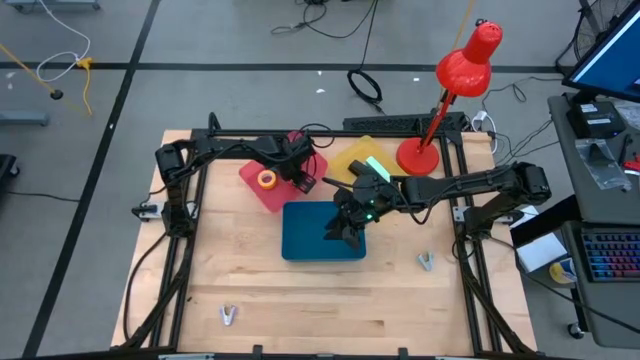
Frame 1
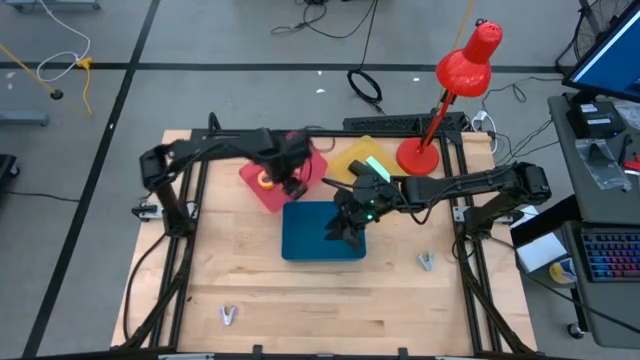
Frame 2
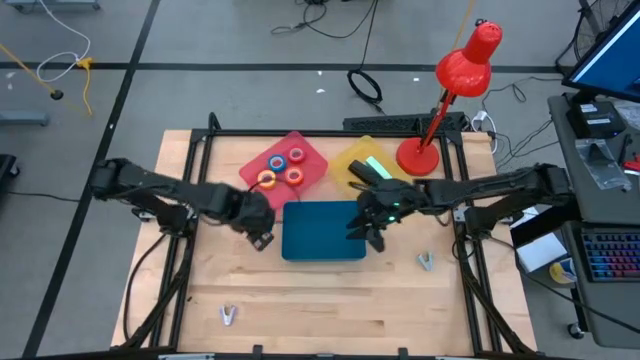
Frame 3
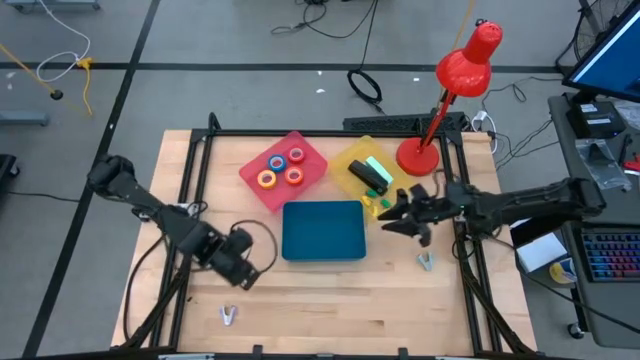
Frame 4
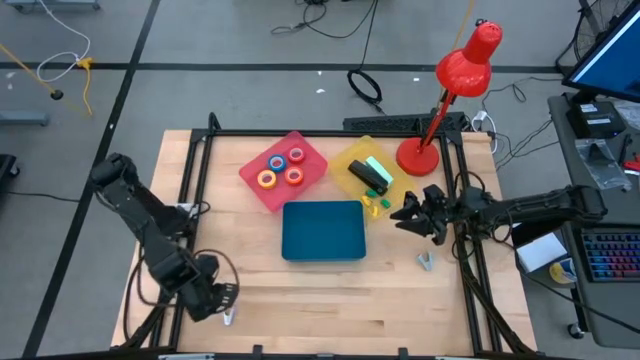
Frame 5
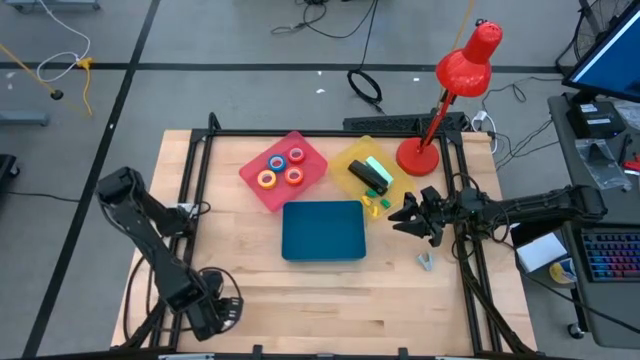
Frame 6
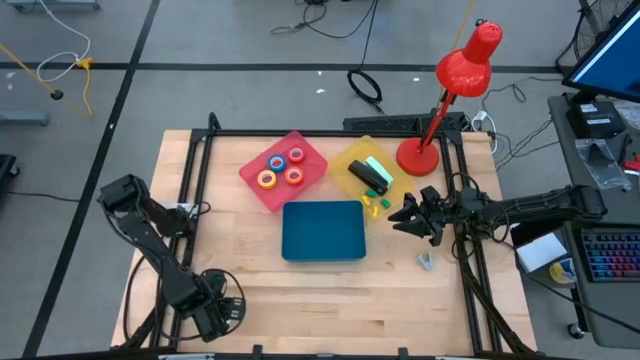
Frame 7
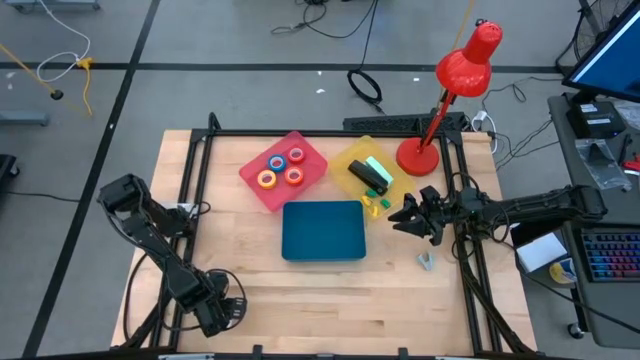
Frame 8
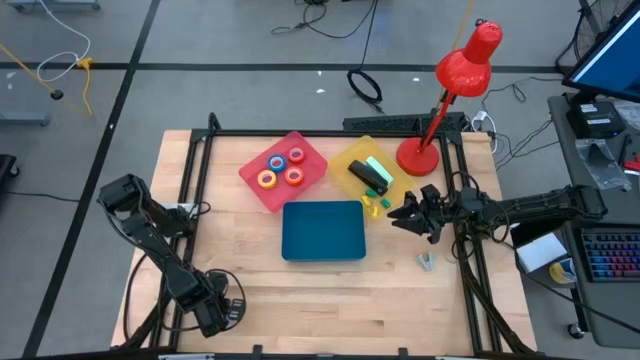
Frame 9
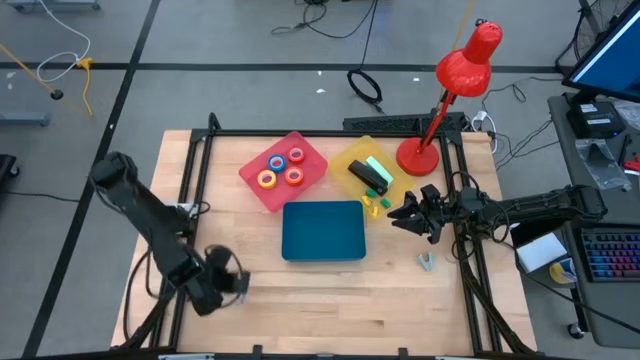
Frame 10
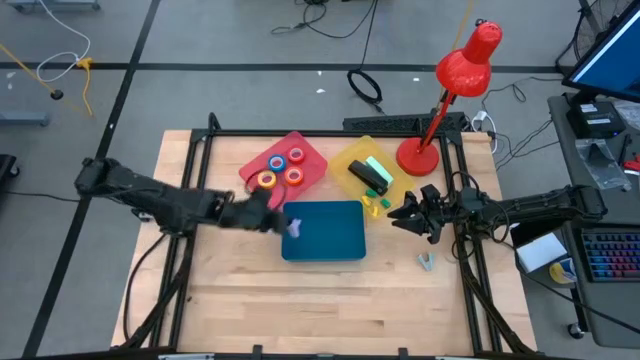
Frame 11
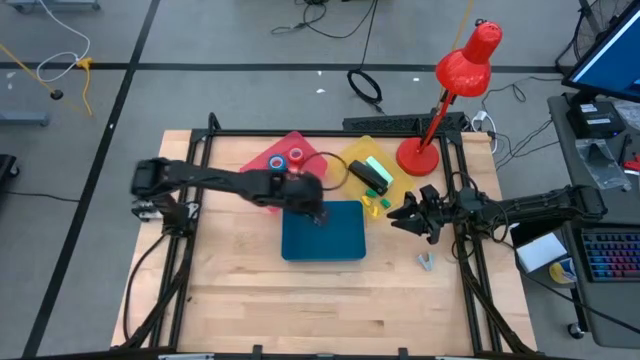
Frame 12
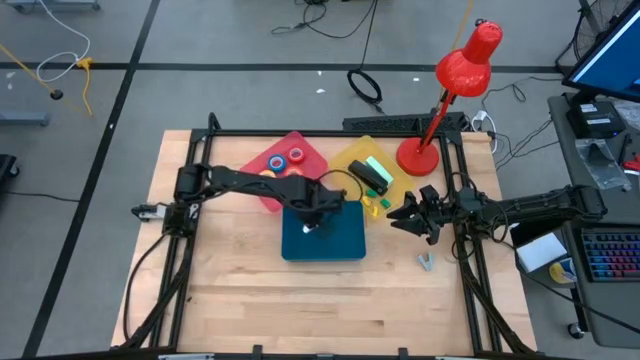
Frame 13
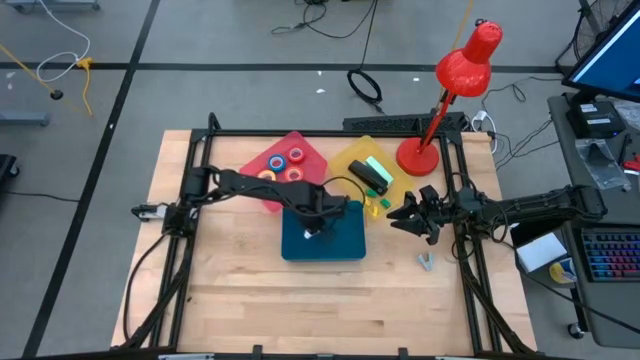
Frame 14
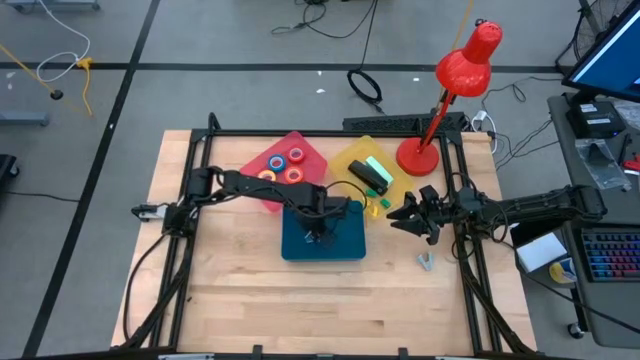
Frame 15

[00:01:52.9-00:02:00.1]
Task: Pick and place Stapler, Stapler remover, tape
Put the violet stapler remover into the blue bin

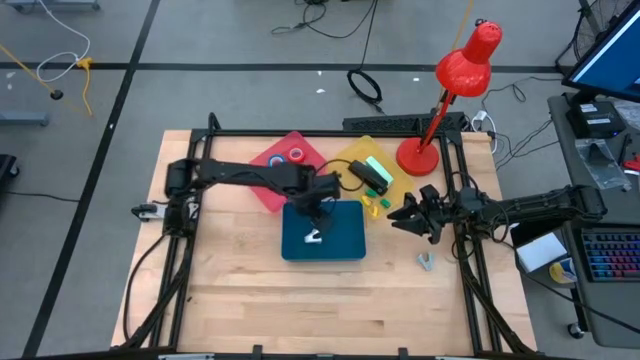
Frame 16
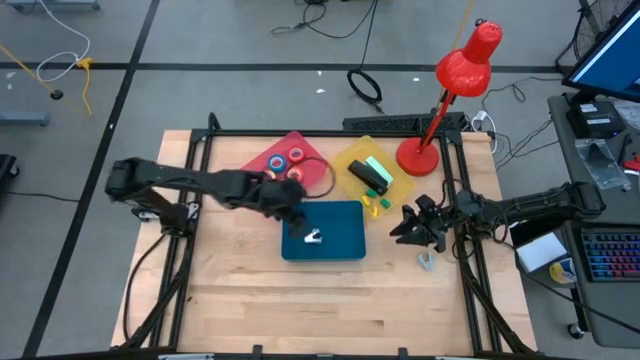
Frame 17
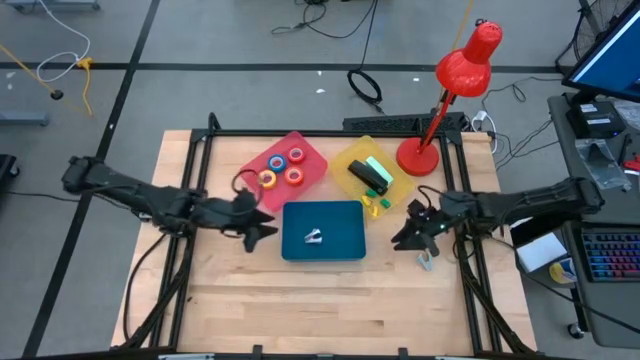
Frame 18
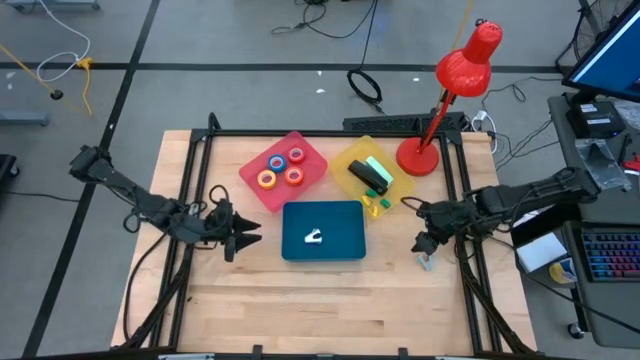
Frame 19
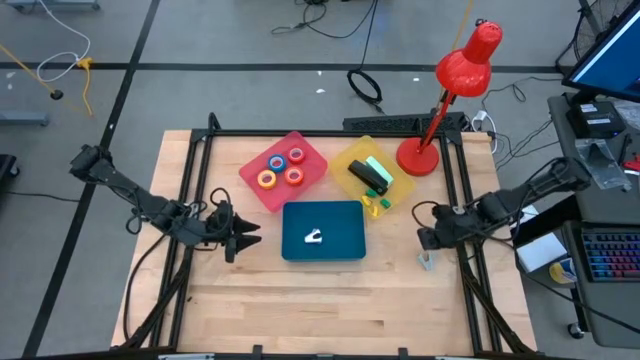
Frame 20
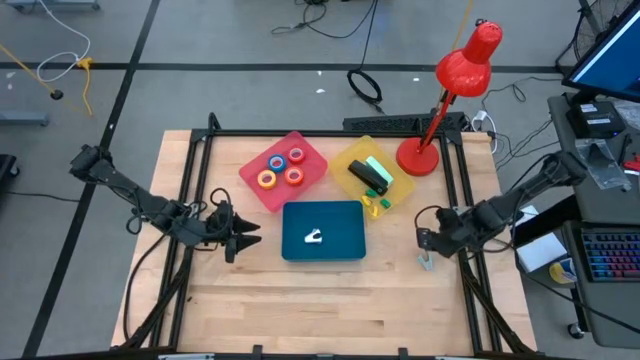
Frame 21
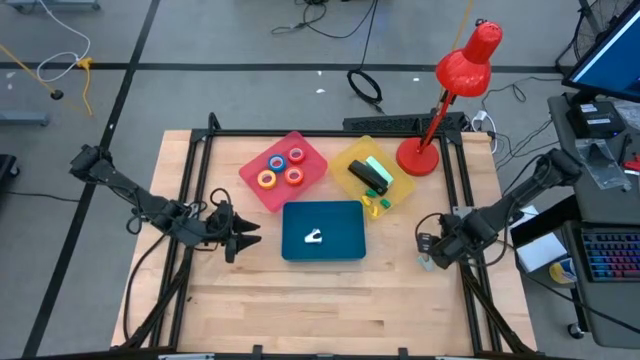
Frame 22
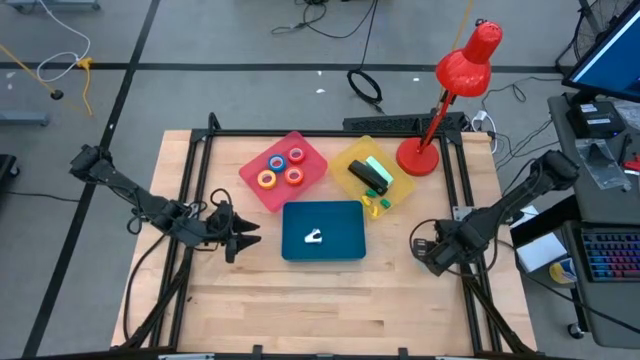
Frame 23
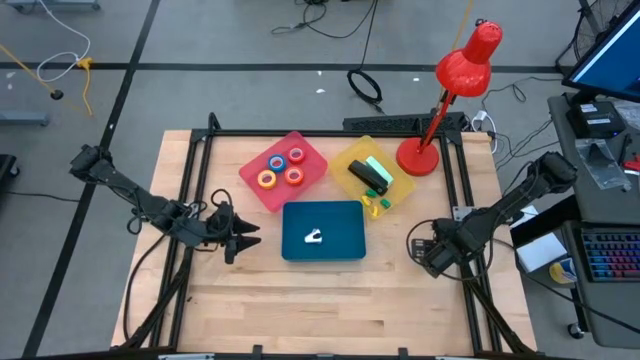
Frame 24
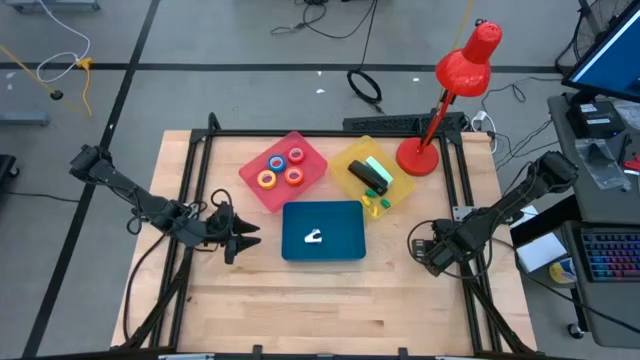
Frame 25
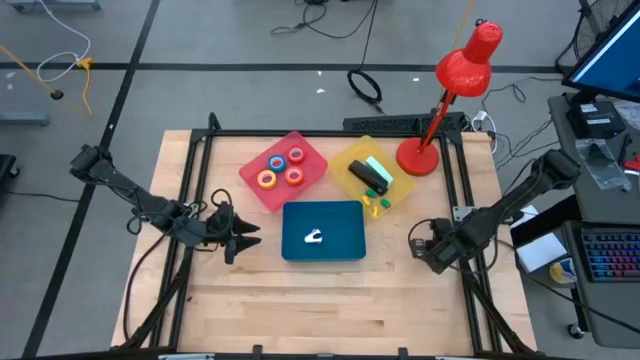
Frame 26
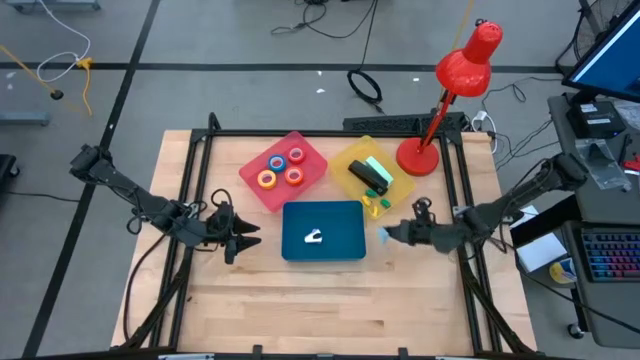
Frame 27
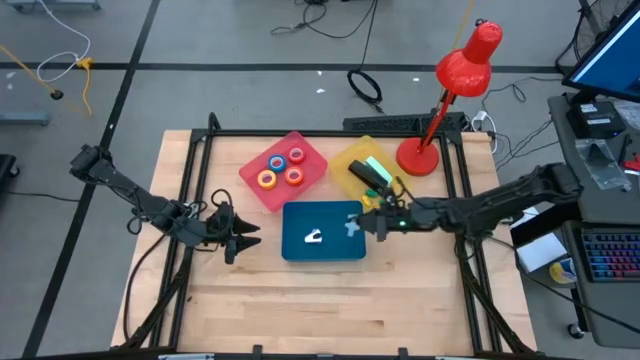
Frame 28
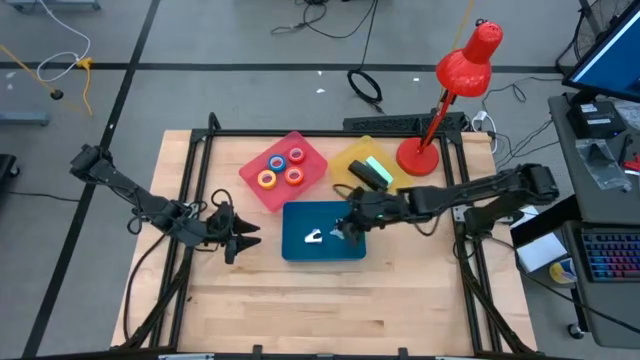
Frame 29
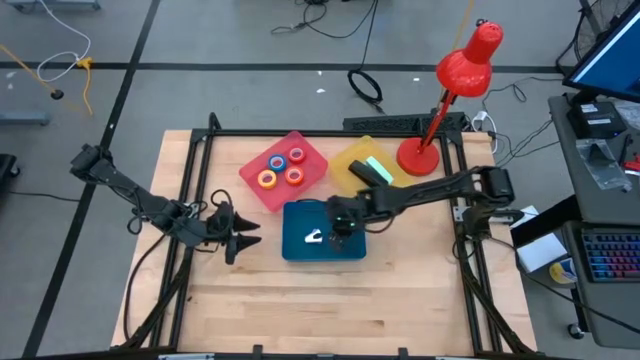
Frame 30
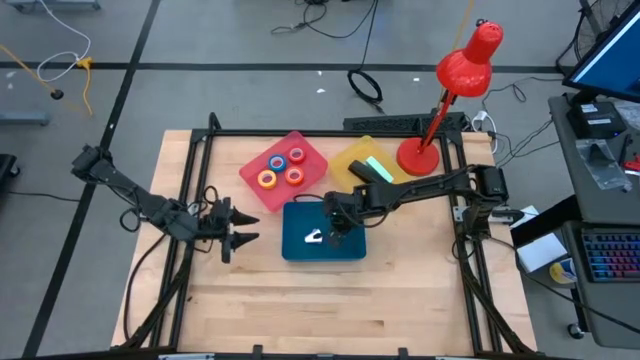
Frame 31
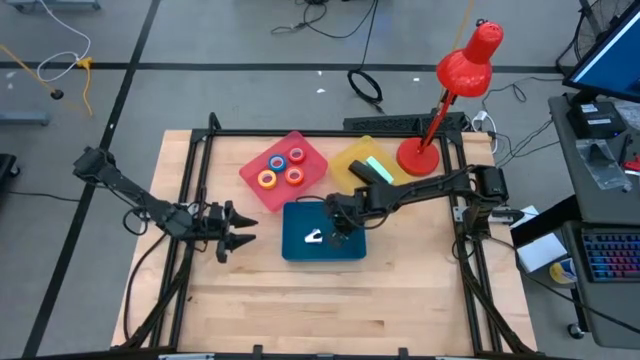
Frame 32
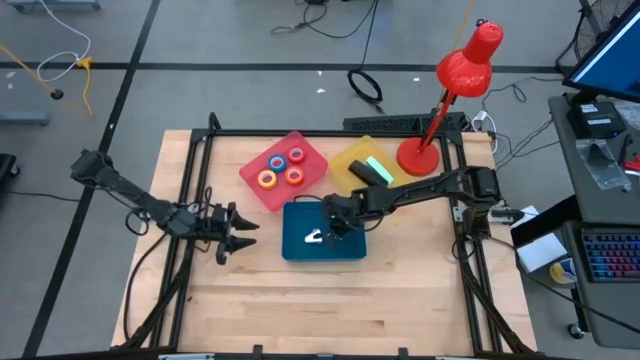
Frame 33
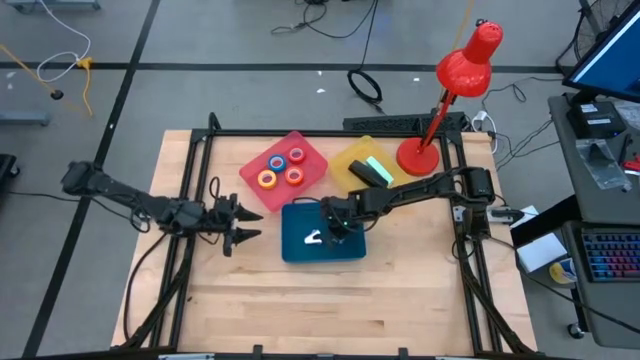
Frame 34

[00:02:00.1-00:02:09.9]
Put the blue stapler remover into the blue bin

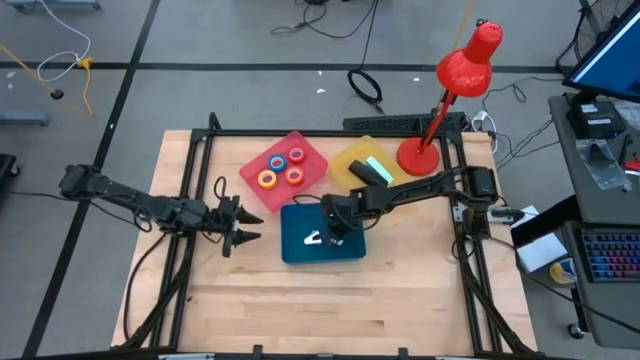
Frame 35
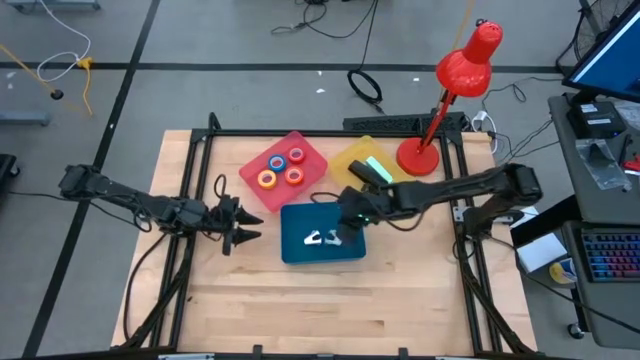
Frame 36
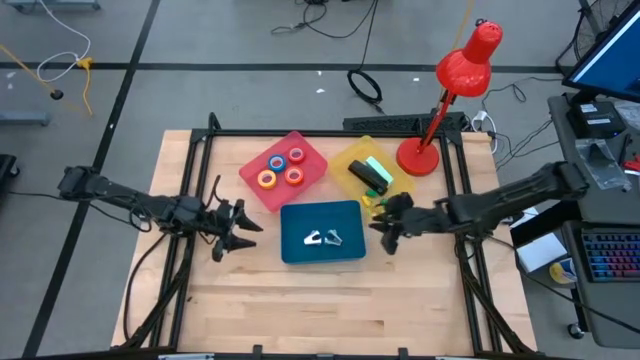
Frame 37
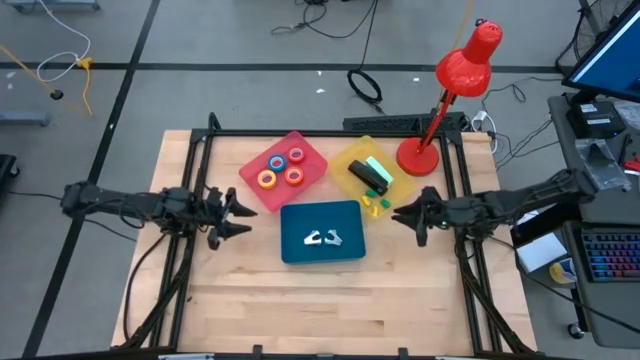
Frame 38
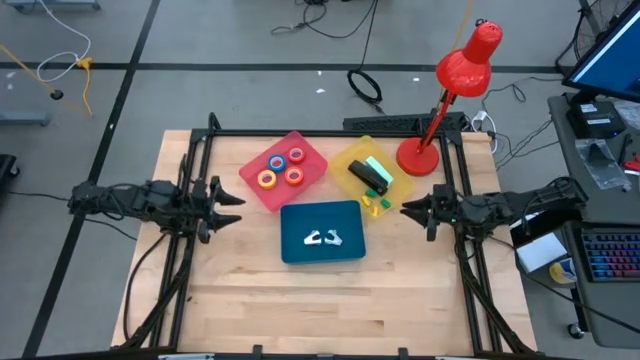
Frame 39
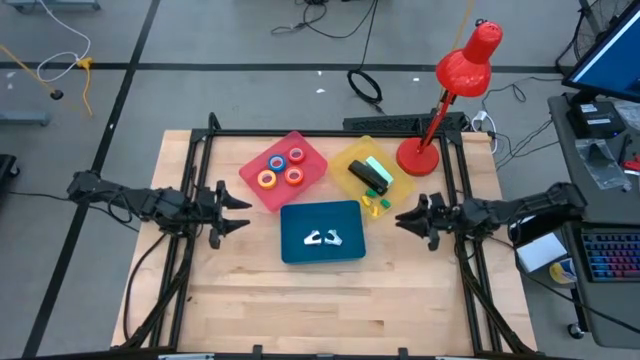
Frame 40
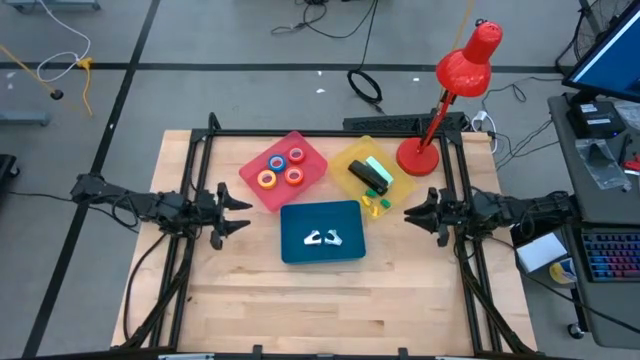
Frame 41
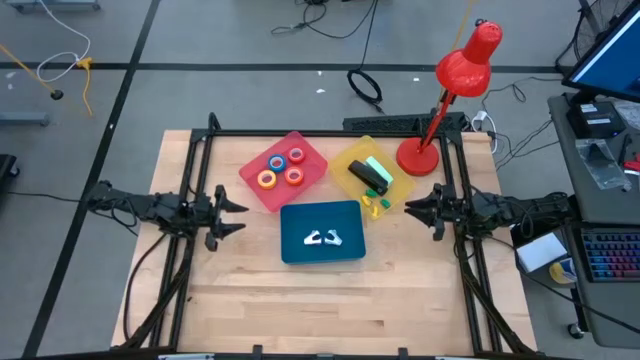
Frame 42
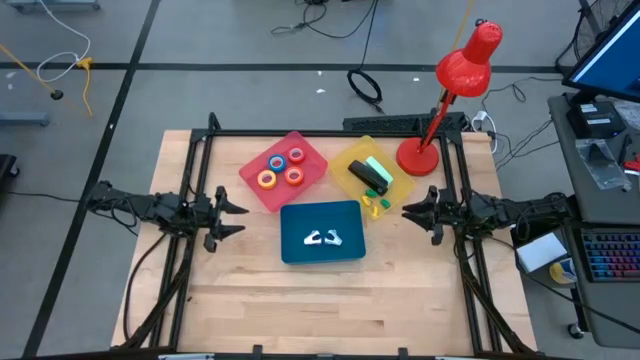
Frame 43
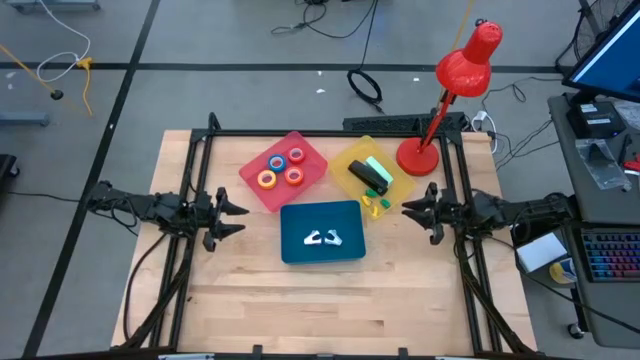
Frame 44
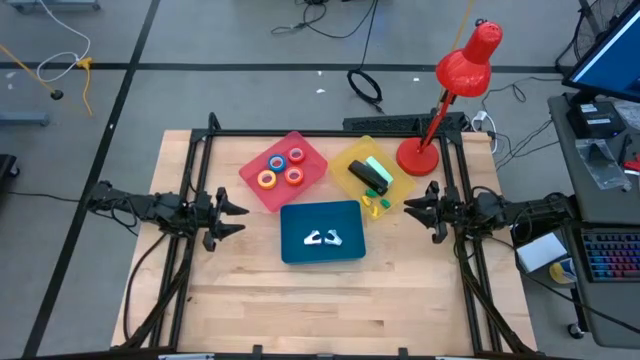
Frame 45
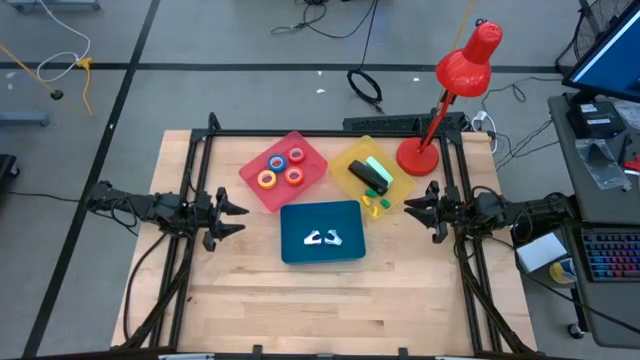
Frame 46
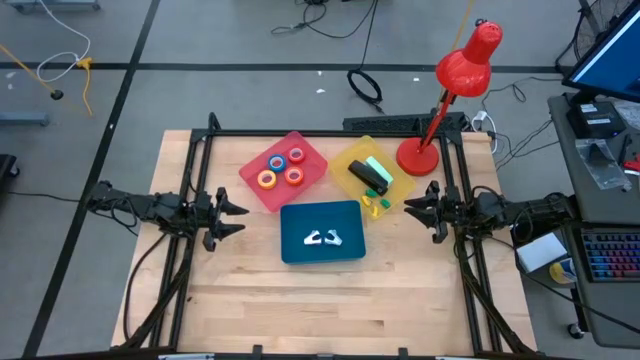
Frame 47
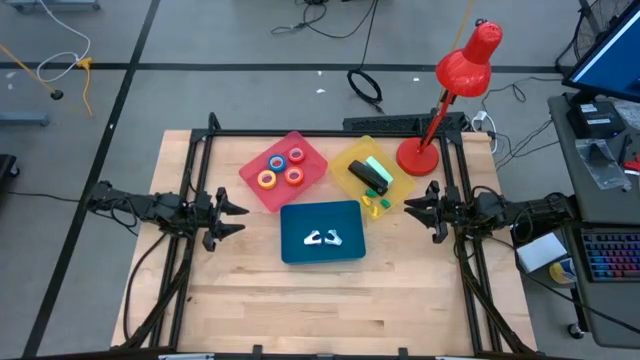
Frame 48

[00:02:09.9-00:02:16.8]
Return to Home Position
